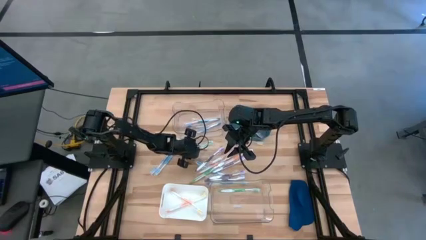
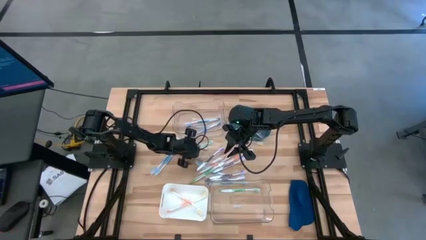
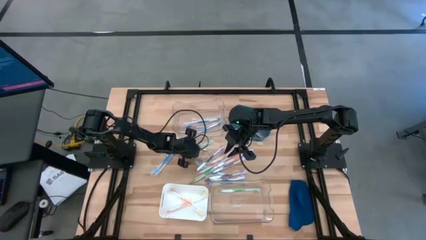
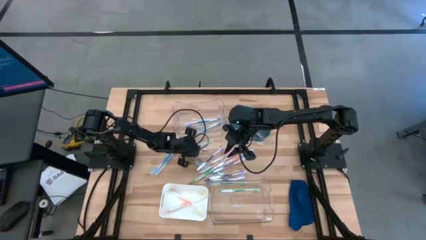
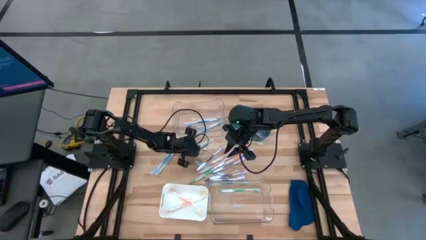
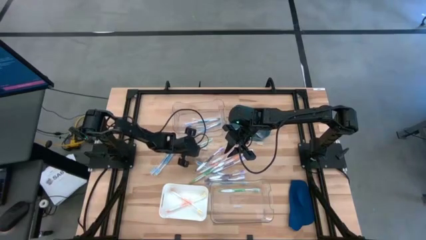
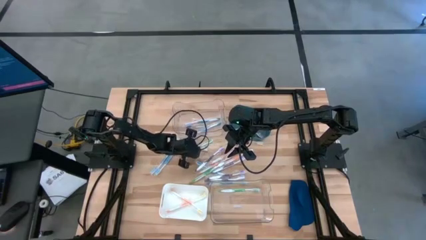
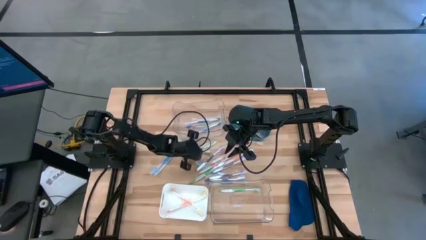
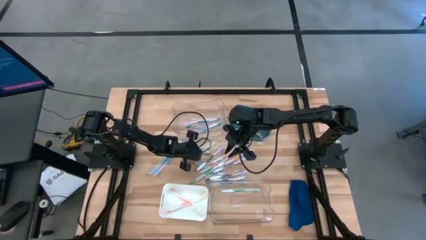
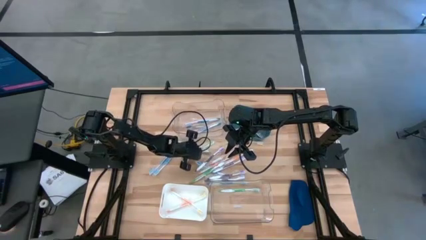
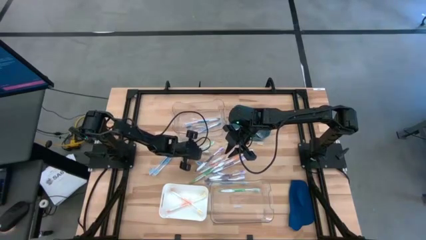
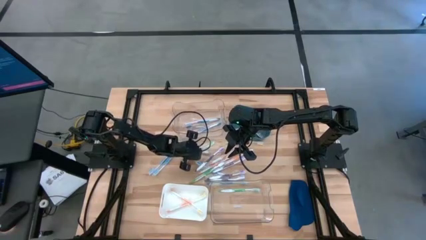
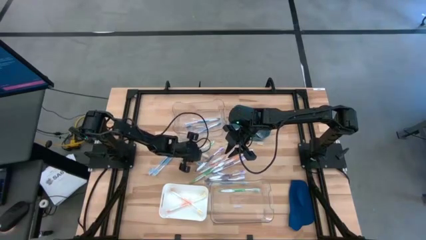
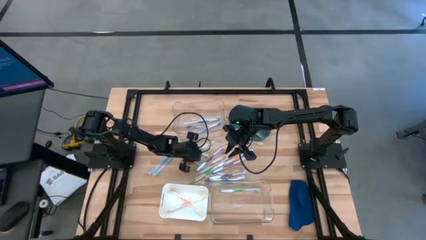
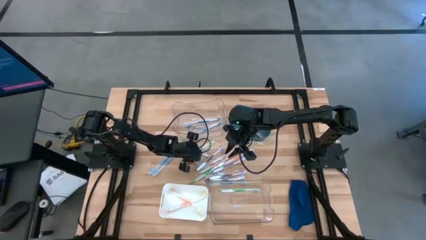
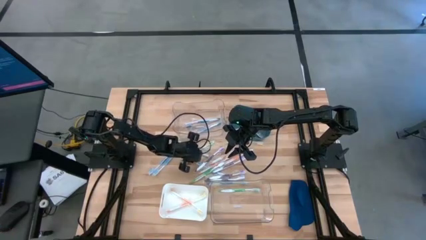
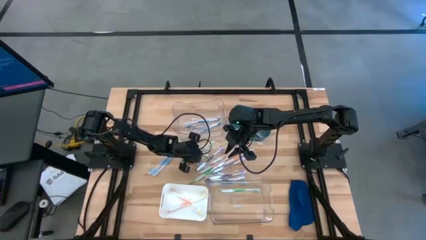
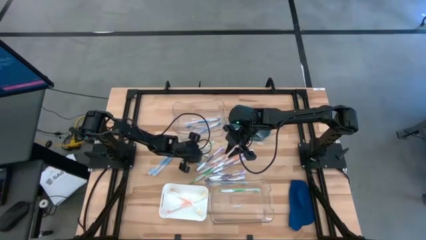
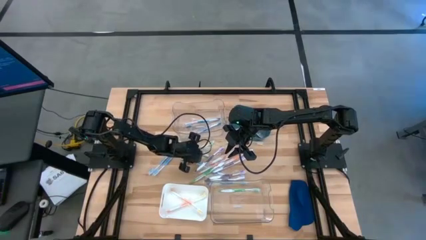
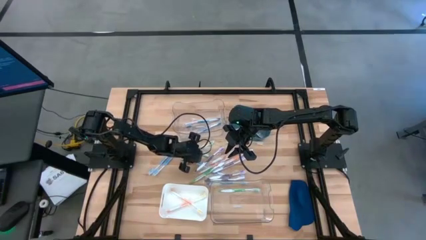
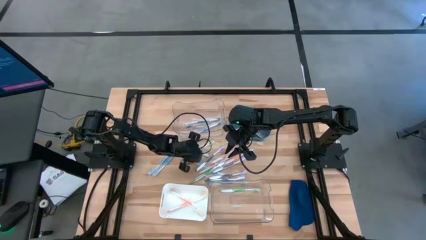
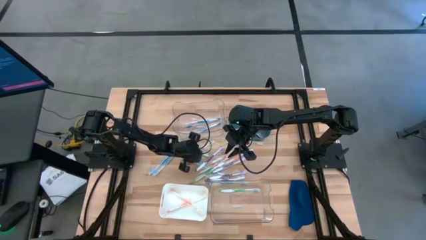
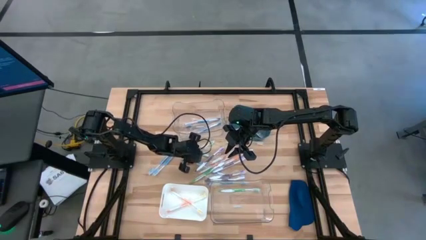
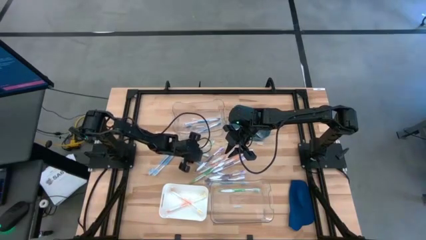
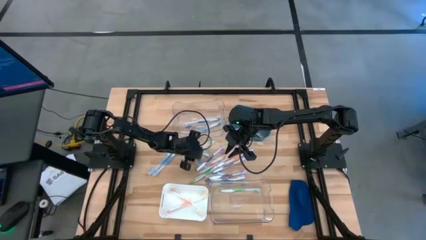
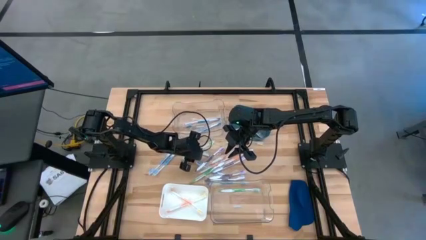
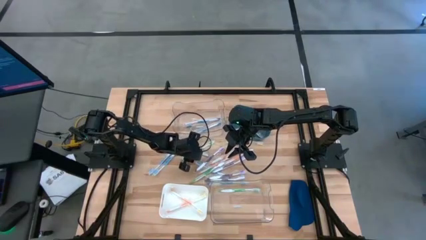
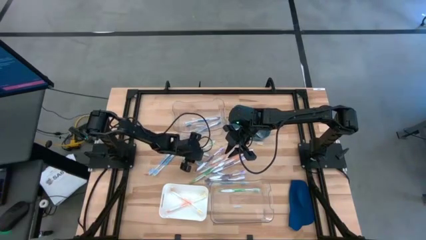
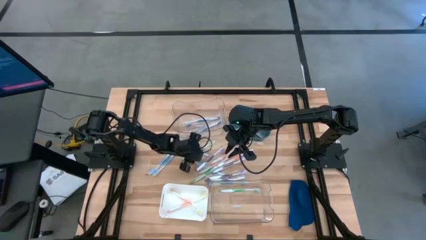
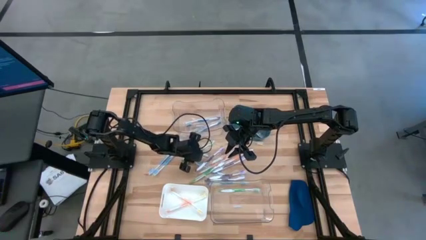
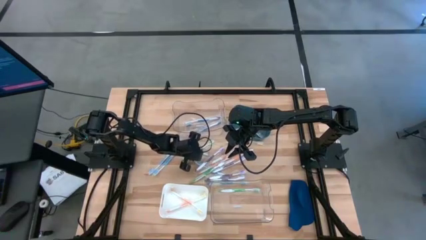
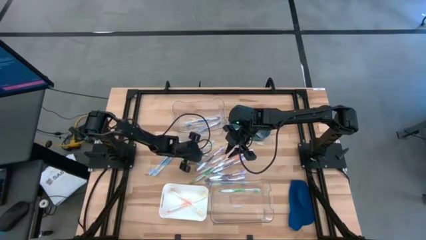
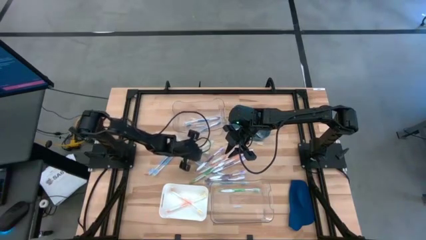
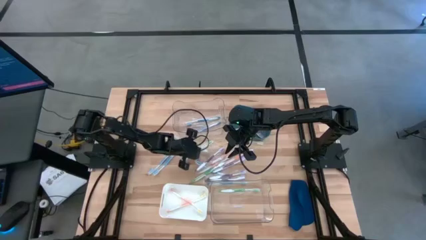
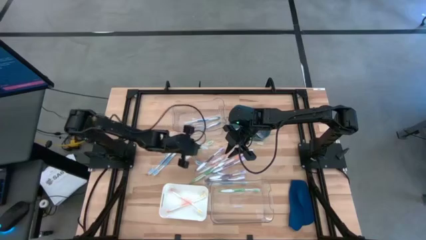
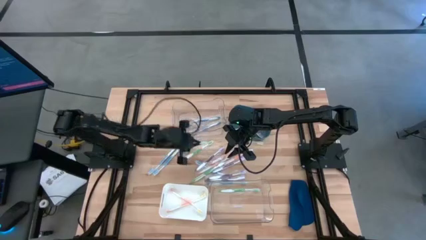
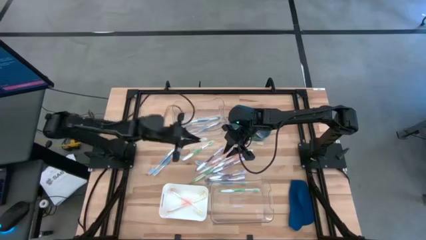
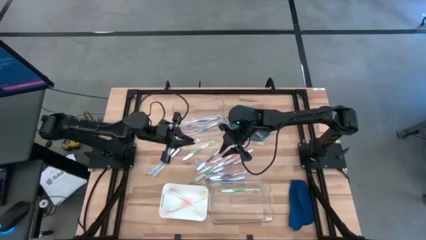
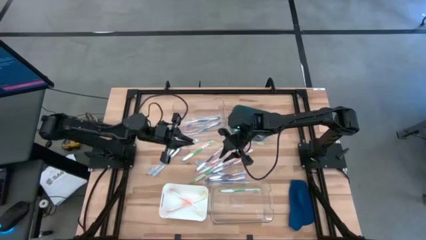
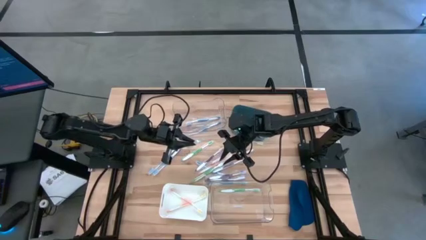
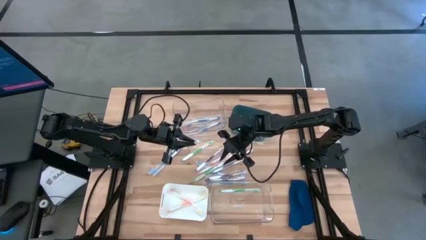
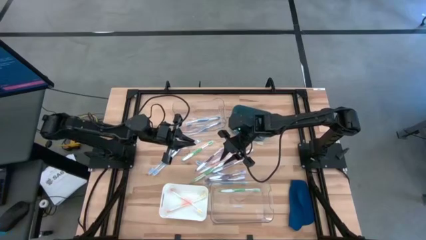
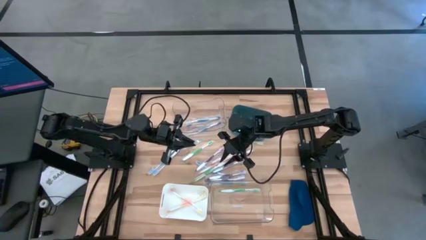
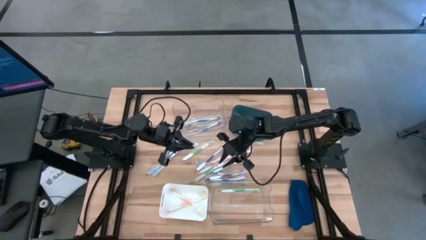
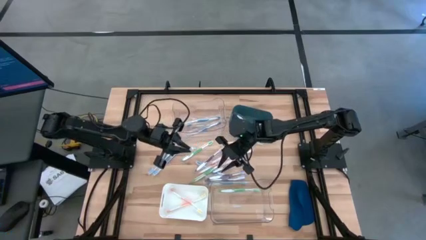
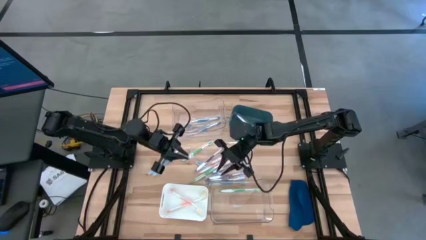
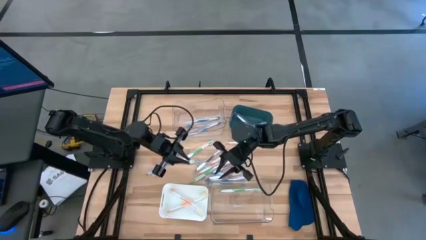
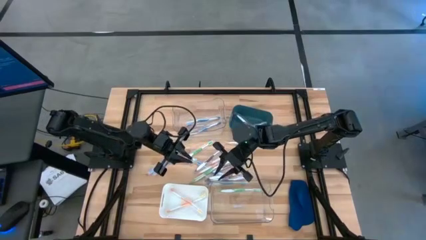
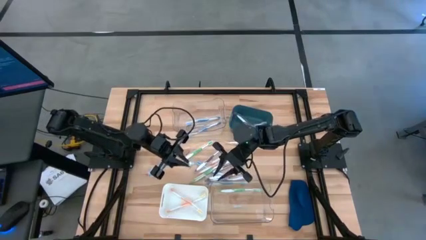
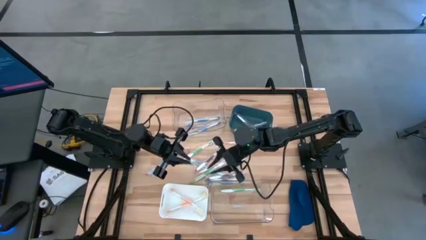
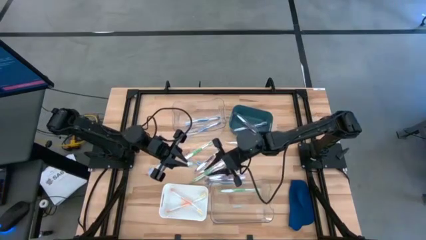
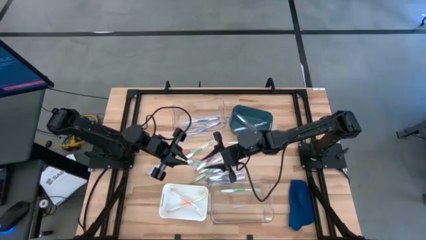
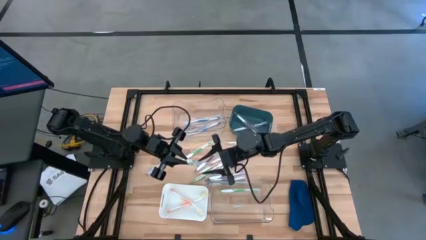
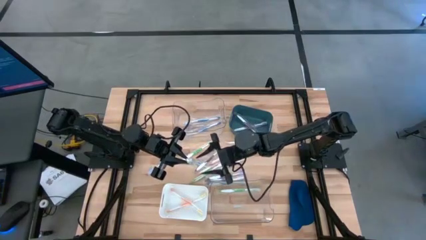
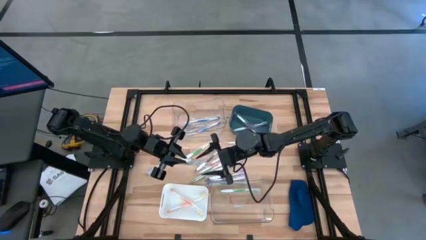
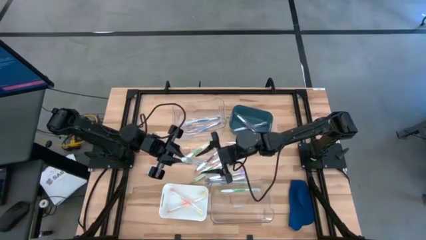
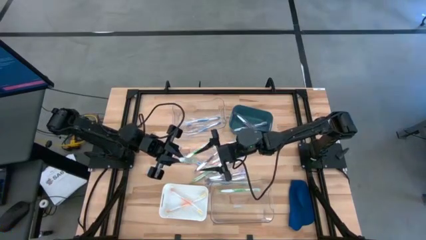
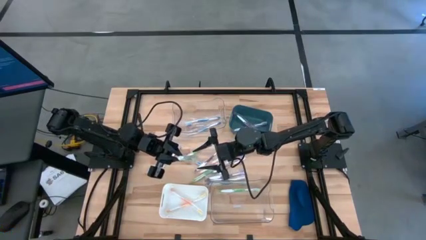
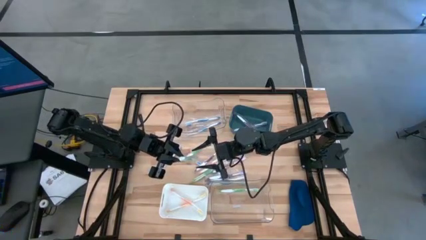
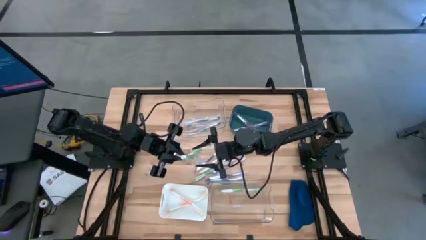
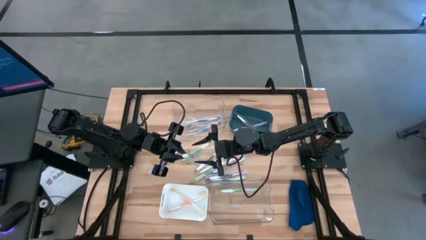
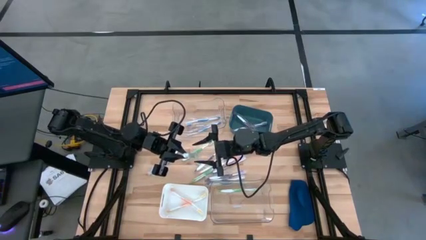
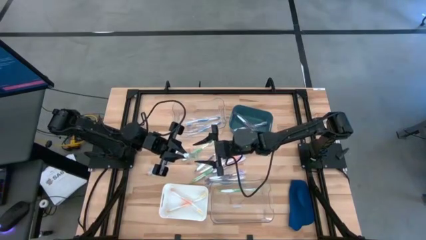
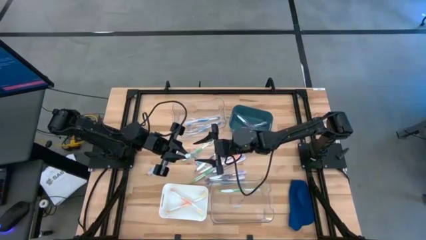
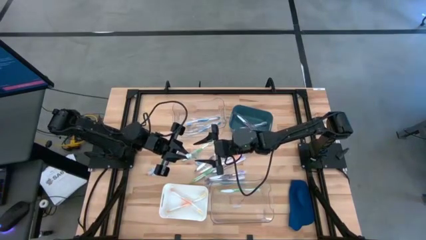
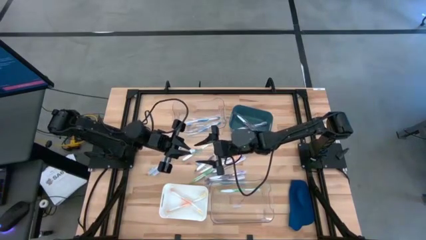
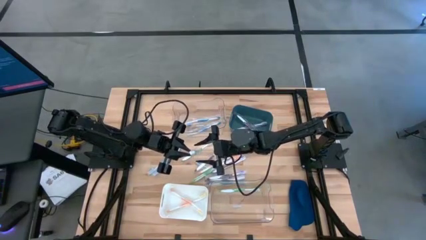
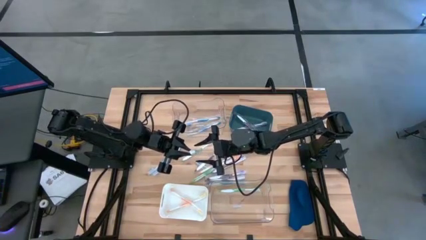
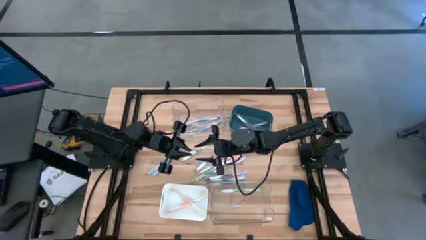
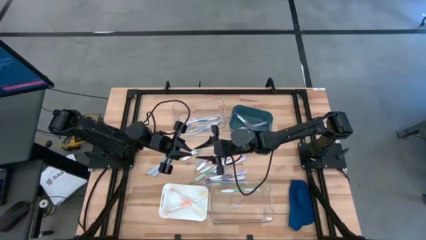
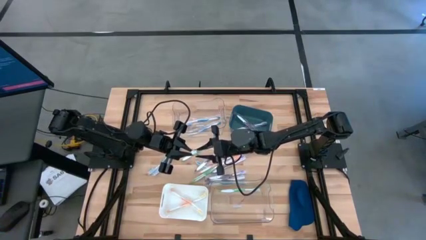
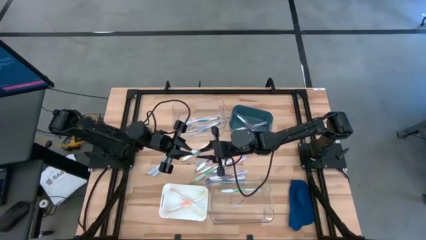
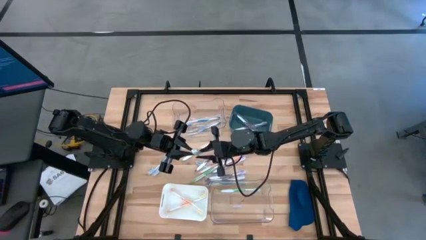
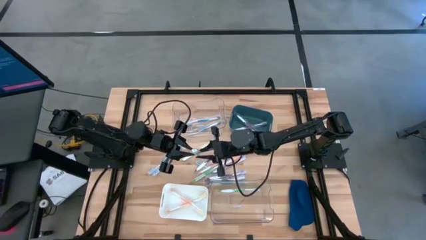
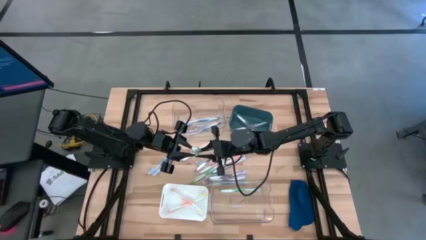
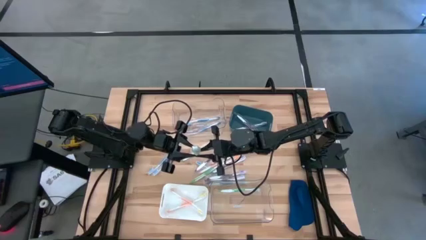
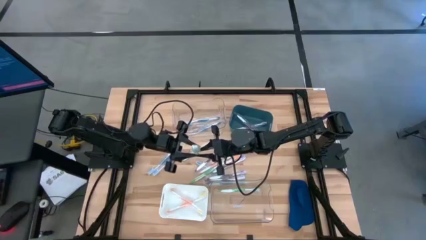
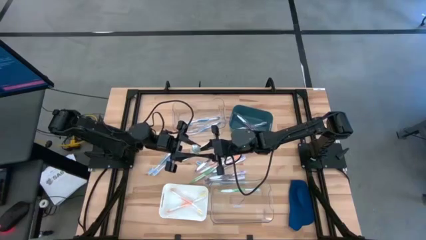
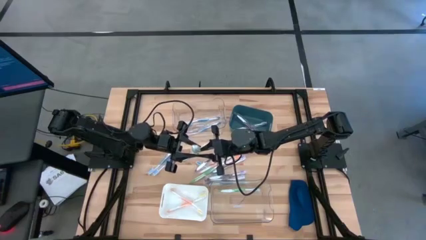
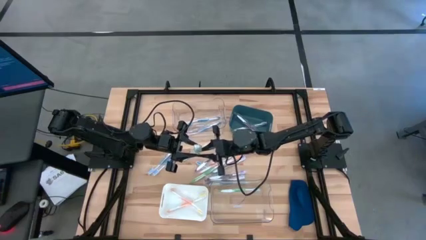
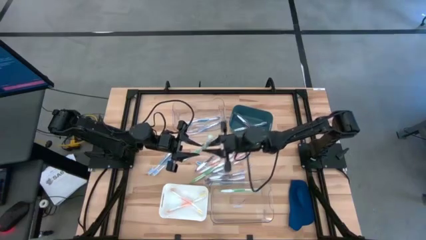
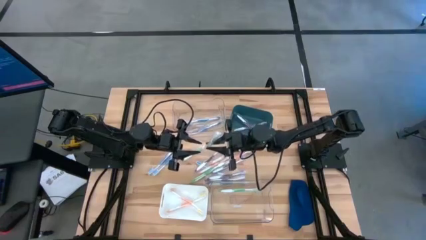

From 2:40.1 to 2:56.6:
Task: Pick & Place Toothbrushes
Put the green toothbrush into the bottom transparent bin
